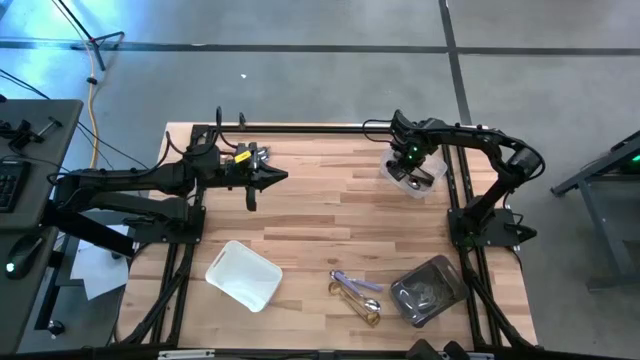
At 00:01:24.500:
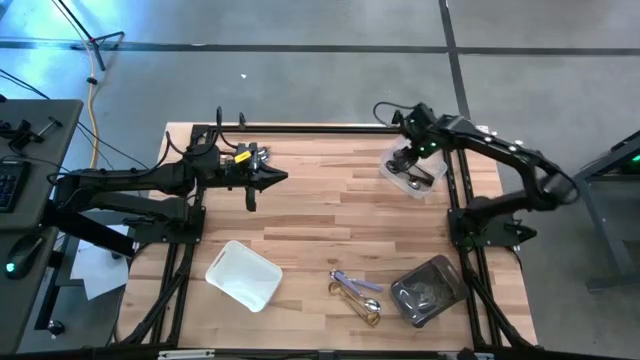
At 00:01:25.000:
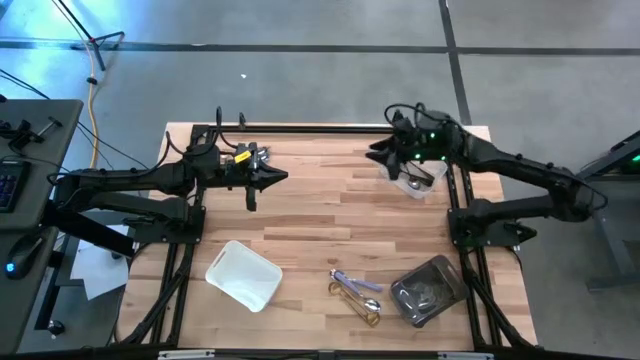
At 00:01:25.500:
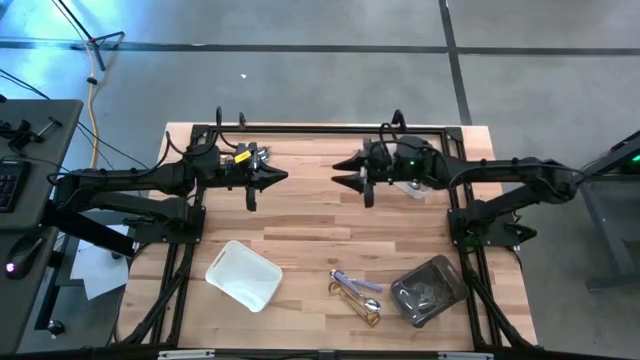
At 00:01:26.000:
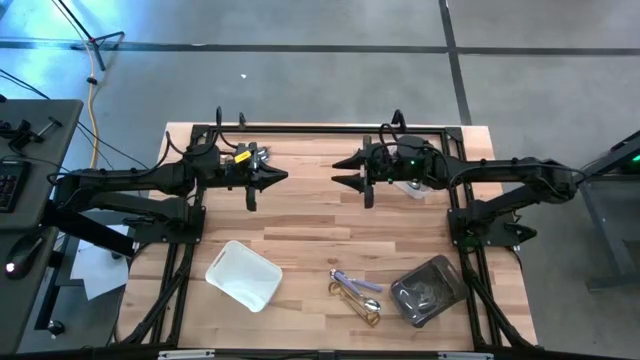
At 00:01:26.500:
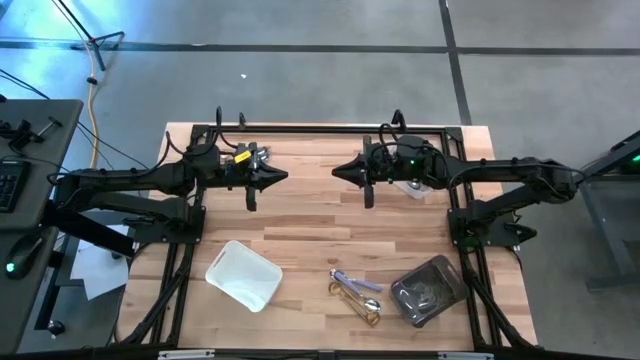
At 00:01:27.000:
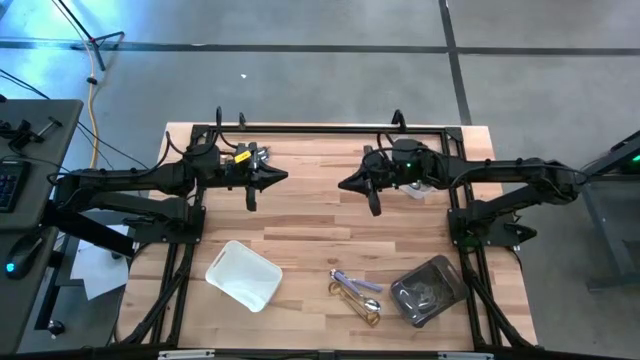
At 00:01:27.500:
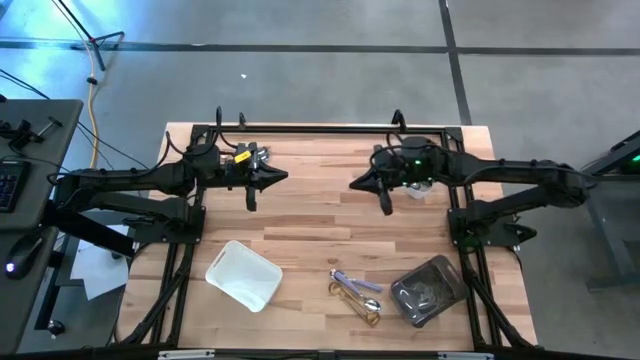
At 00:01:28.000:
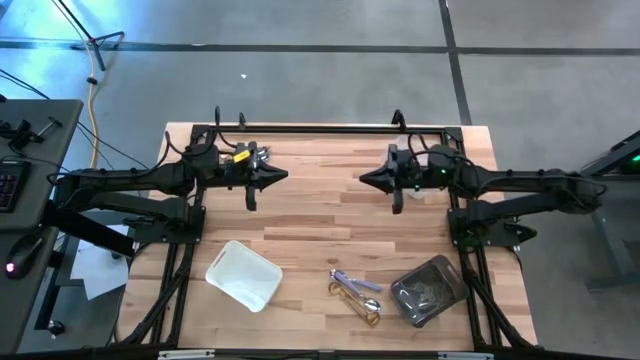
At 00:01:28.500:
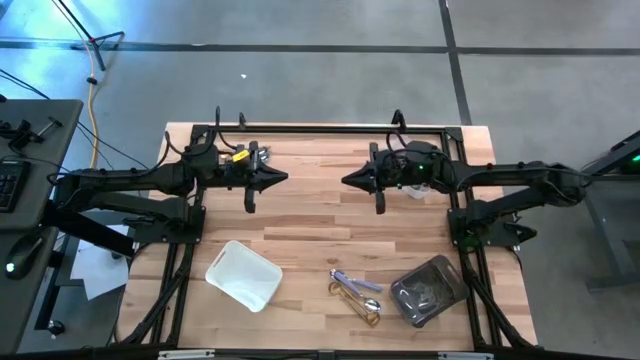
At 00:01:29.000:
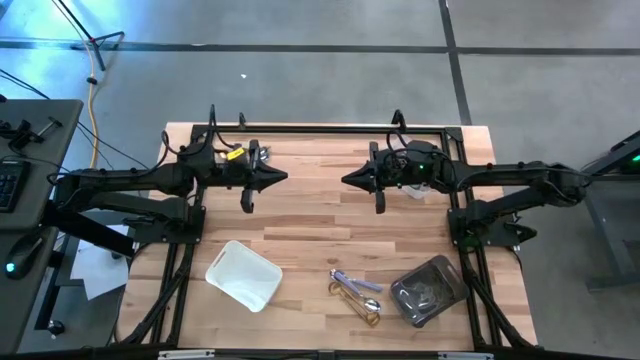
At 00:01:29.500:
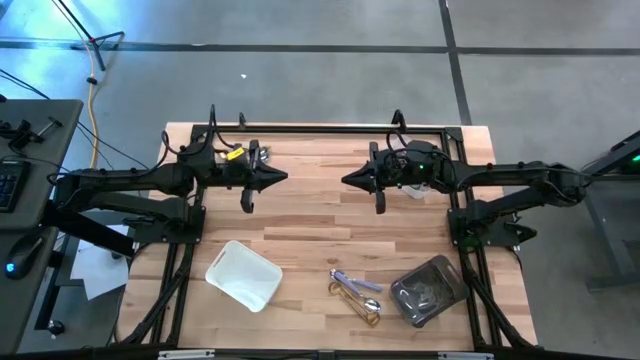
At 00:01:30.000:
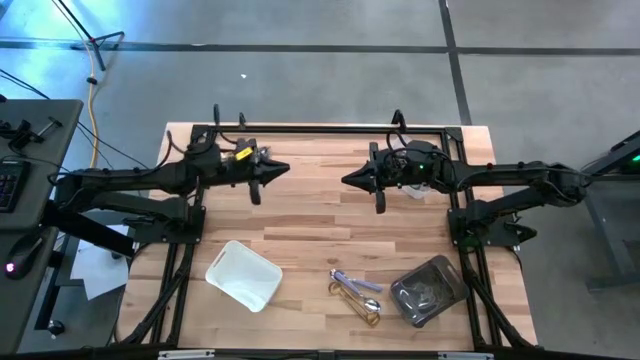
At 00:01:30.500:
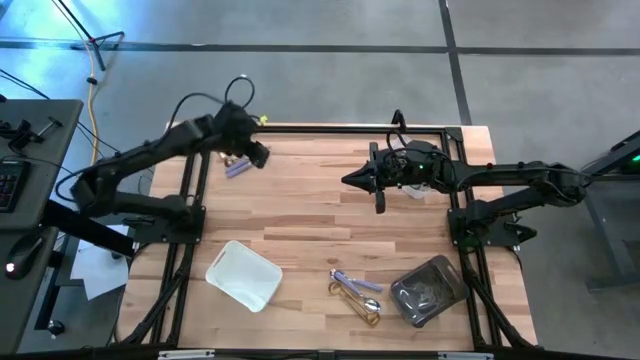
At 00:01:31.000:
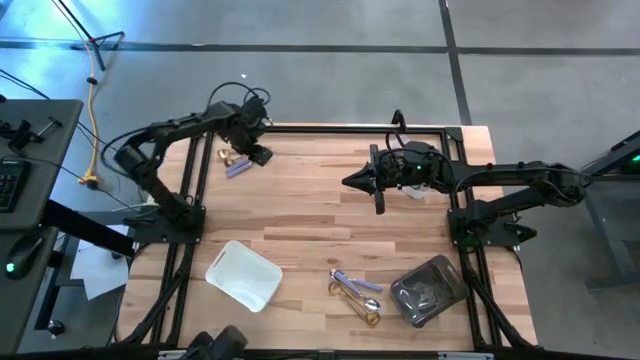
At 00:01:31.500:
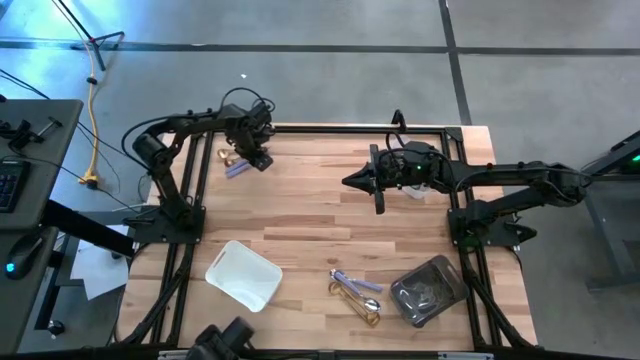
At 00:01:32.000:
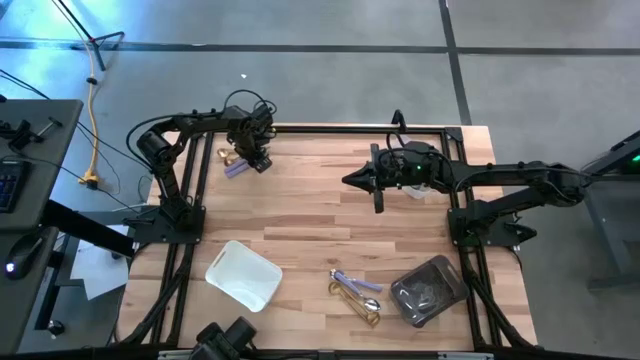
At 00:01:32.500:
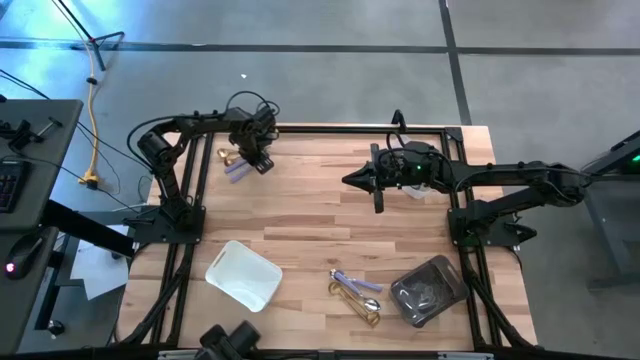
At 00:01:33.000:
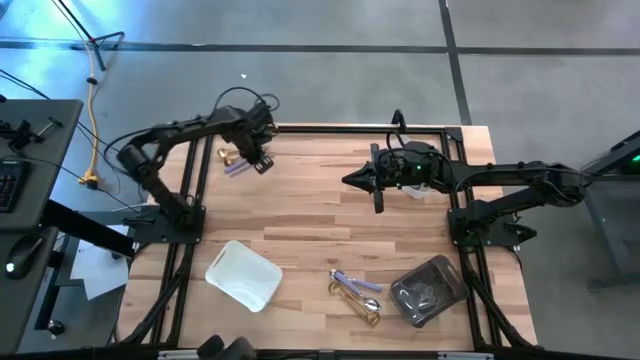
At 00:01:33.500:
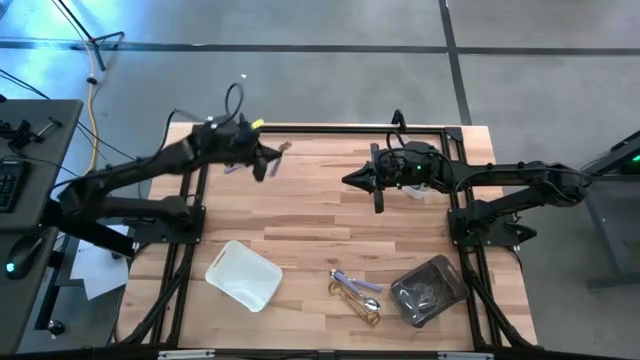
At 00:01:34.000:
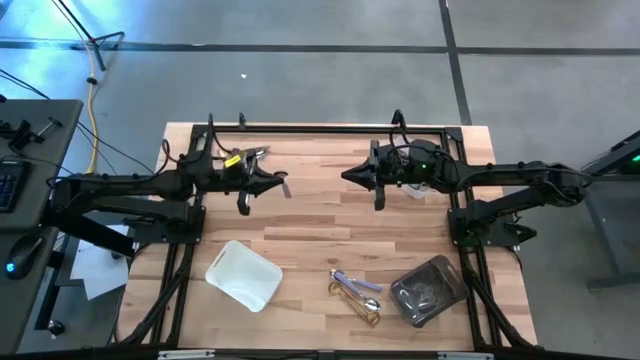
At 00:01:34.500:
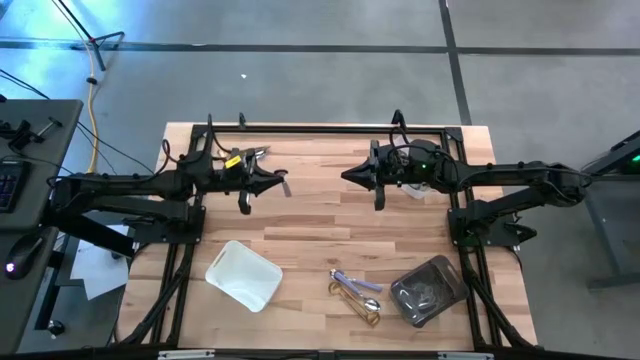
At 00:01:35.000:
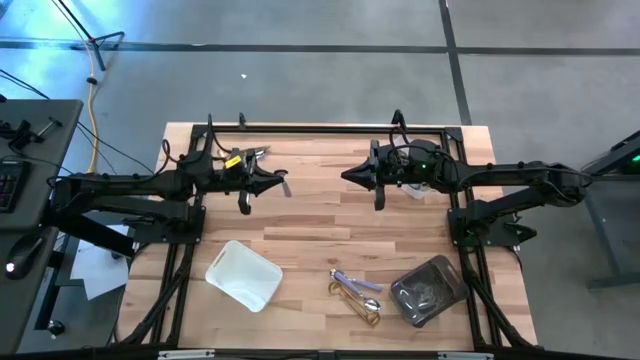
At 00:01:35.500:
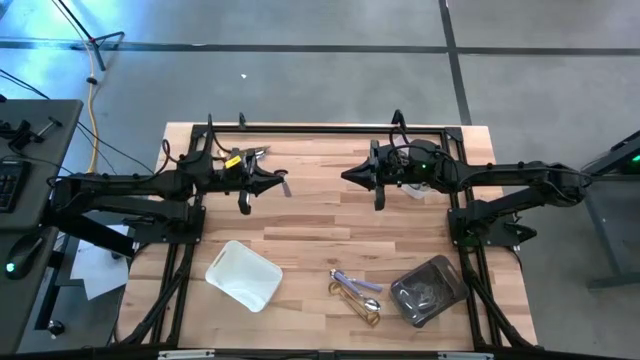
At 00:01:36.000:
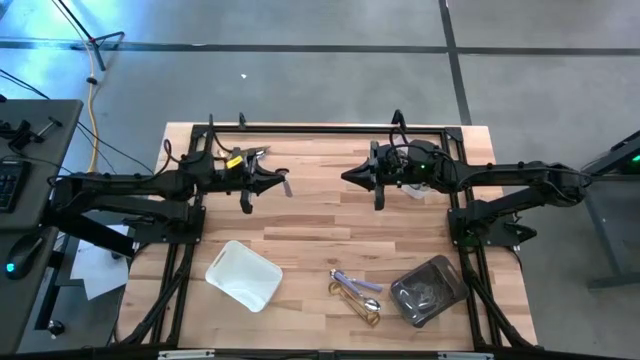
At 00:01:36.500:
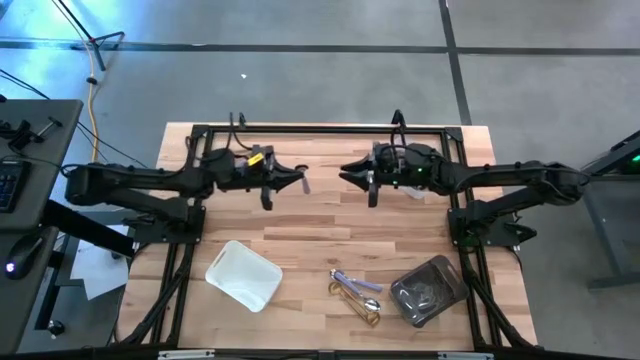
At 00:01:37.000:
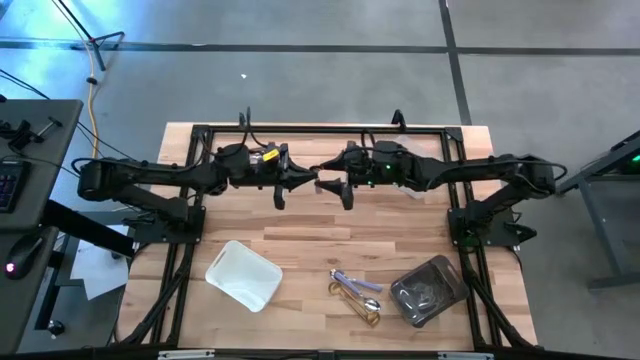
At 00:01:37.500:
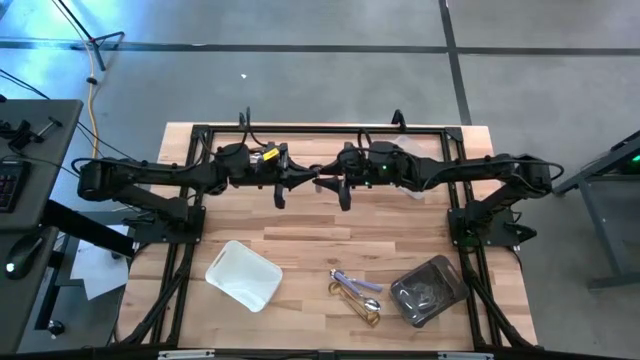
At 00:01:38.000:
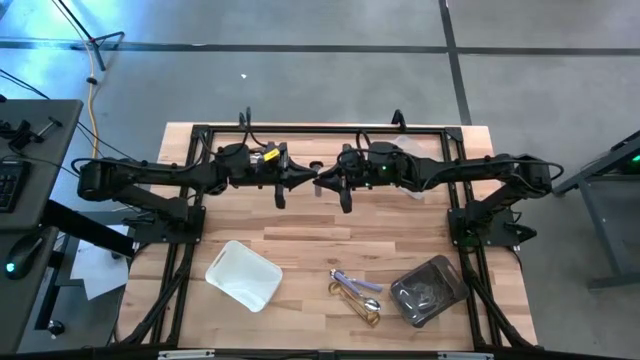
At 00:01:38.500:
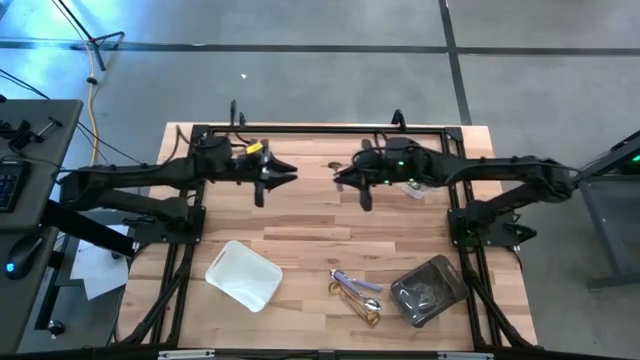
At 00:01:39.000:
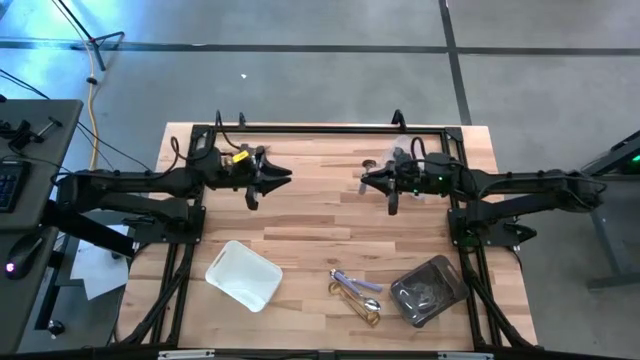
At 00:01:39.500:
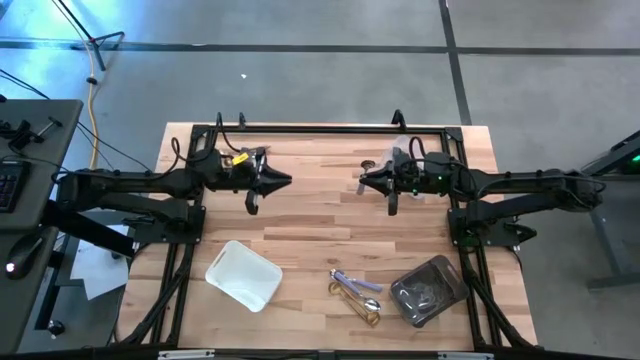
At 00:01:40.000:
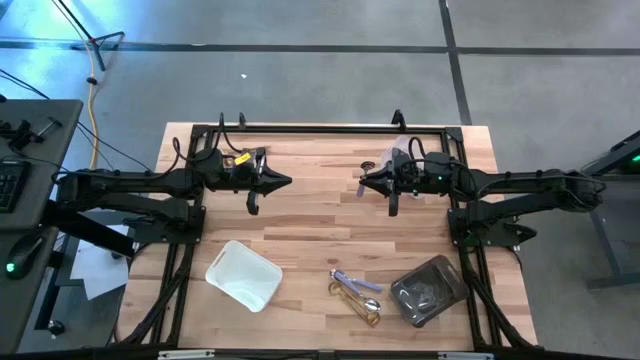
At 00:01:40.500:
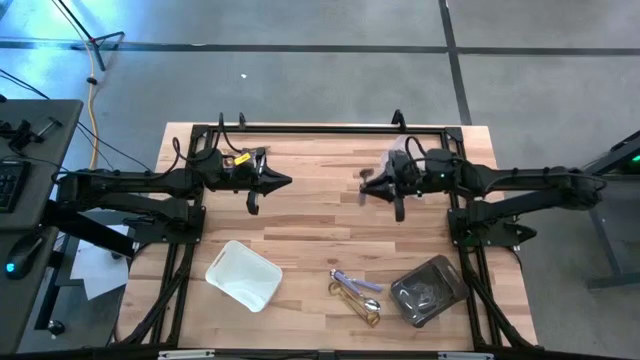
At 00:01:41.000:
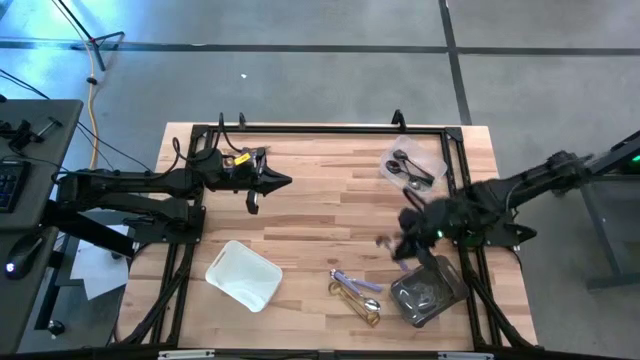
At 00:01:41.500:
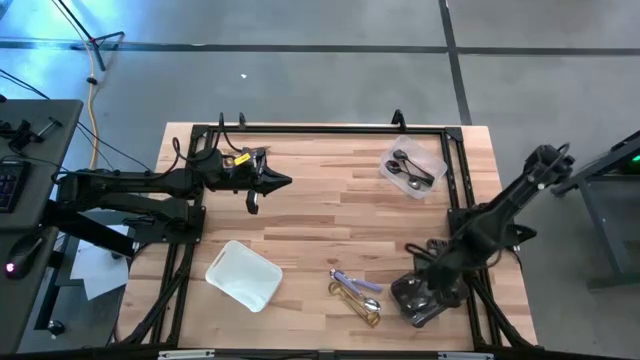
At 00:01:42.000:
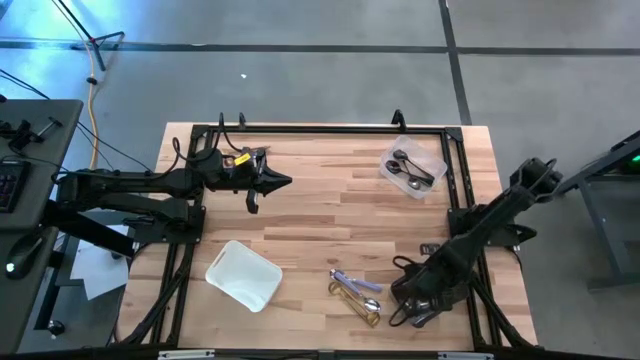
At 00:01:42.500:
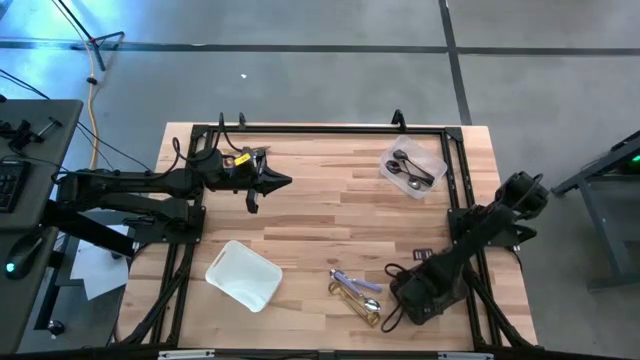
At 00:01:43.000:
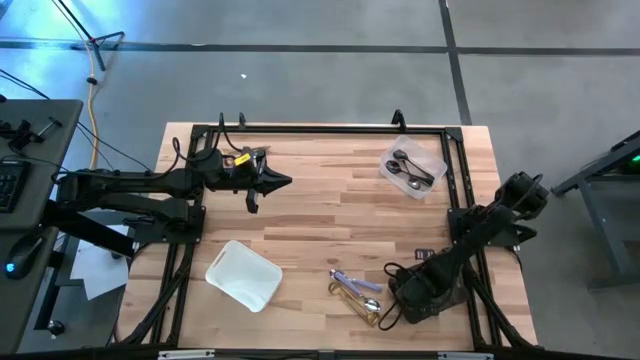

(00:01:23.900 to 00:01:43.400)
Task: Sort silverware by color (type)
Put the violet spoon into the black bin

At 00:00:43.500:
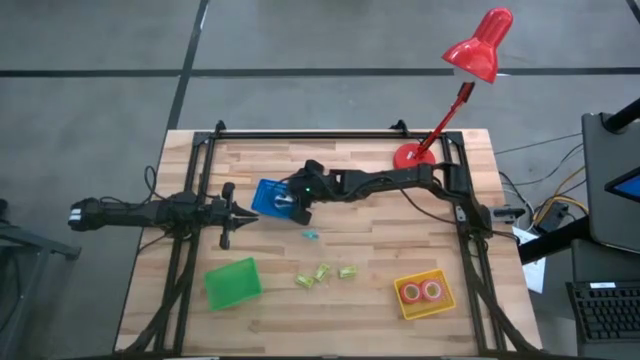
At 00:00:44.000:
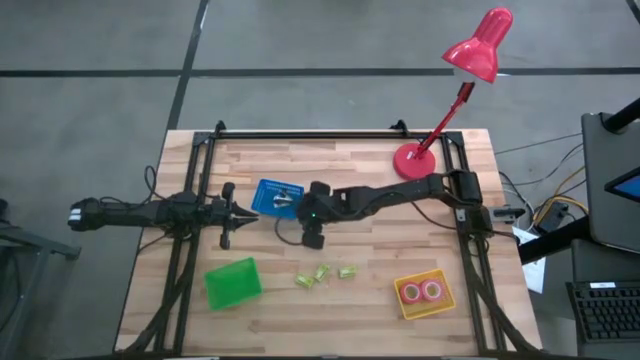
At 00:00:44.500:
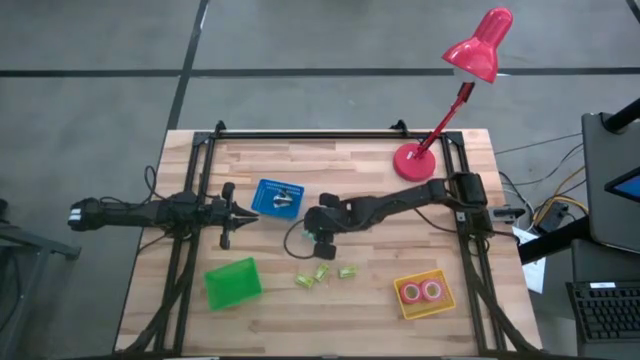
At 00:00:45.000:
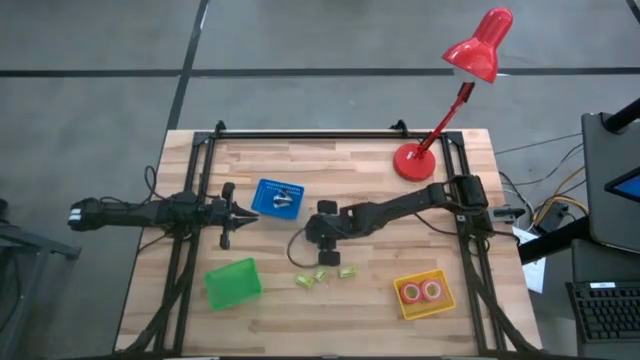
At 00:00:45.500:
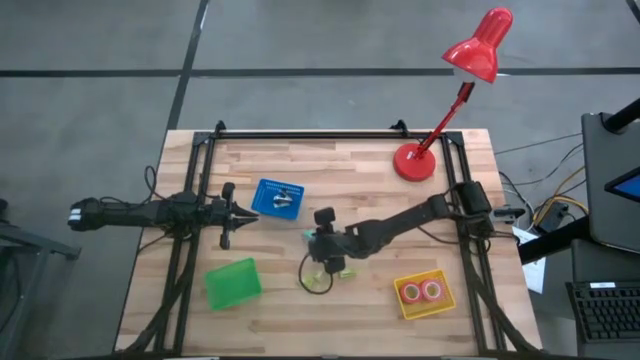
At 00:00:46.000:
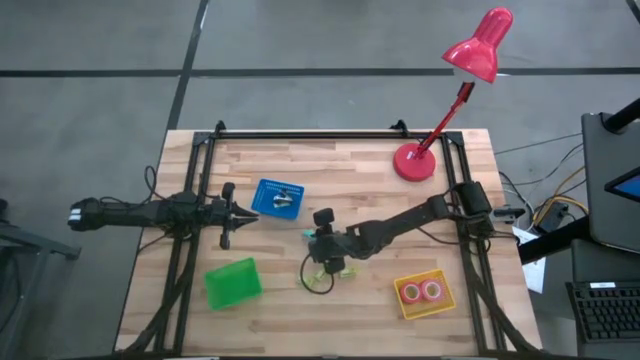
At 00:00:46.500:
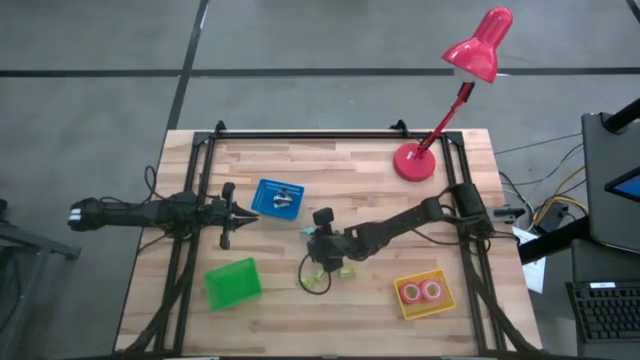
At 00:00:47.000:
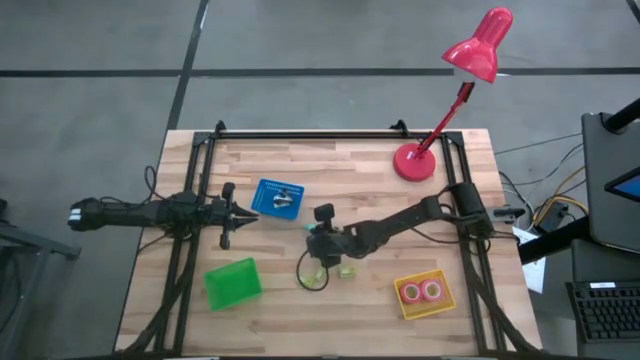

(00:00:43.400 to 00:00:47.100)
Task: Pick and place Stapler, Stapler remover, tape
Put the light blue staple remover into the blue bin
